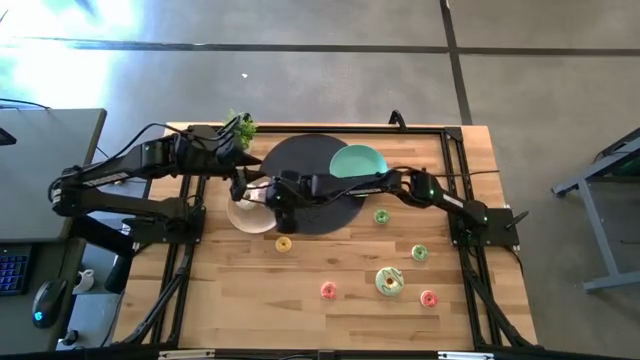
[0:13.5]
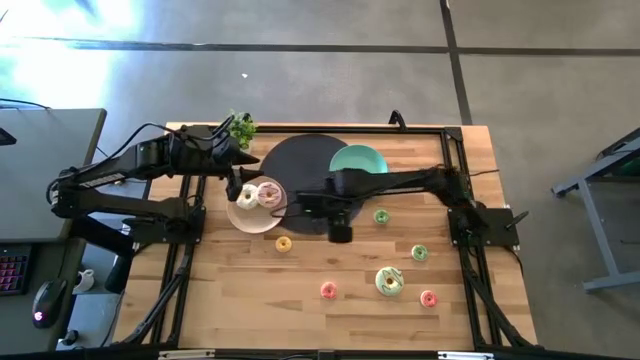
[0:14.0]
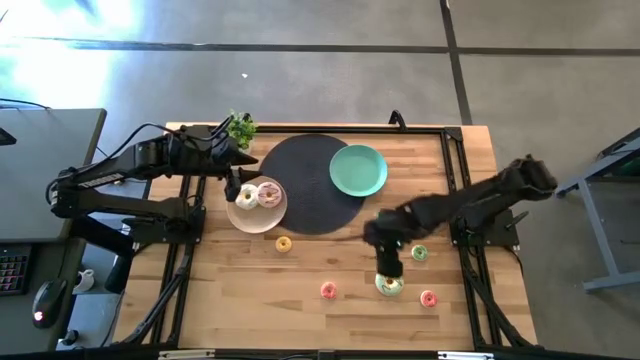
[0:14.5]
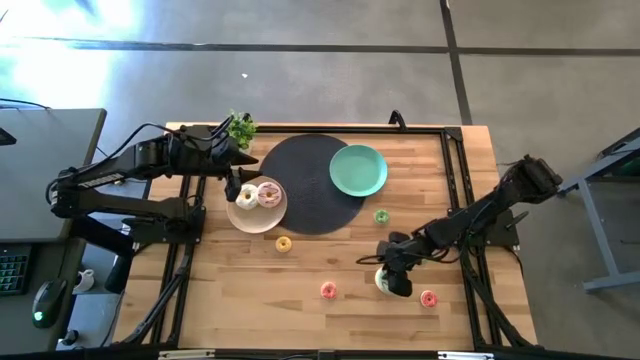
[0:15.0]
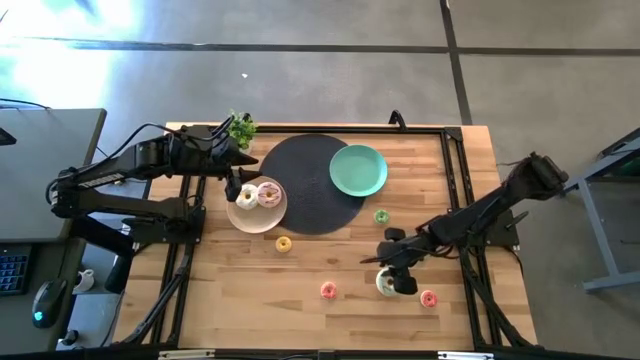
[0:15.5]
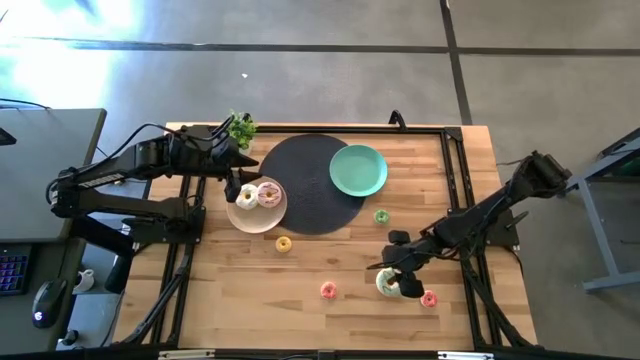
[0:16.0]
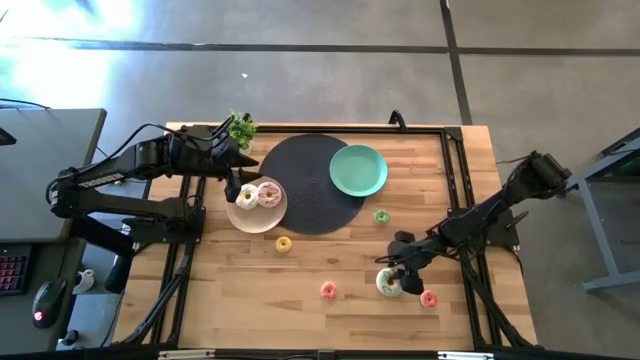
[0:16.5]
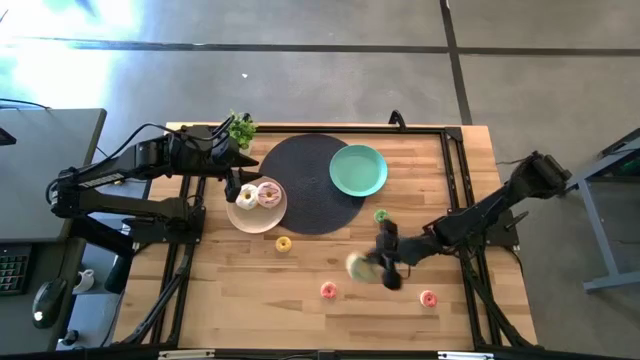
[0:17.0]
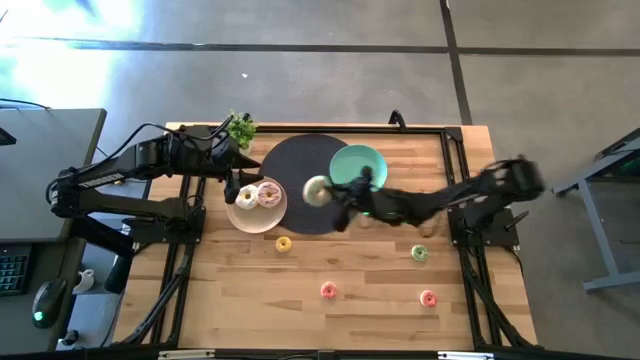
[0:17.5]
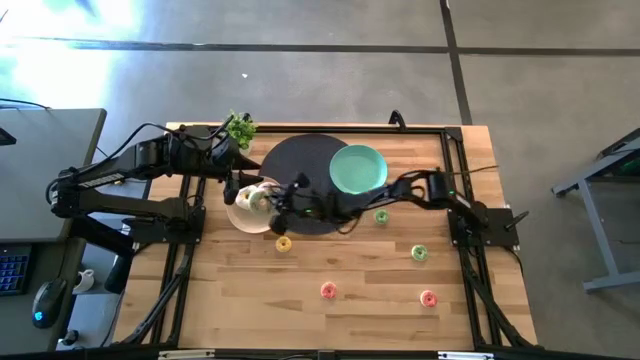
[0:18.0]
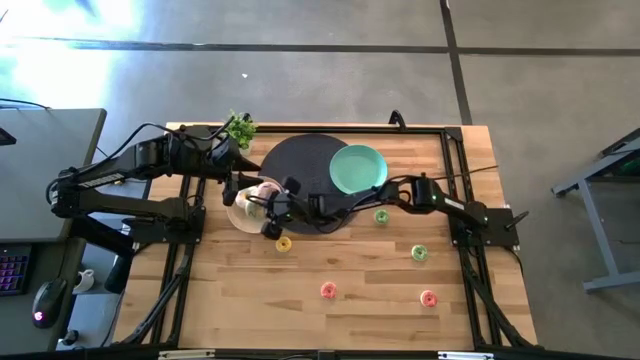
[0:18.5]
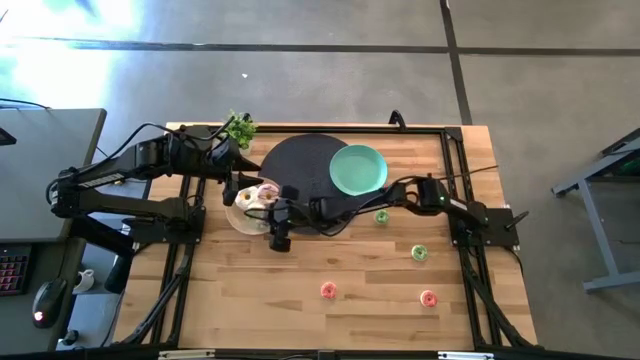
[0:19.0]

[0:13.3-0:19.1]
Task: Pick & Place donuts
Put the large light blue donut on the brown plate

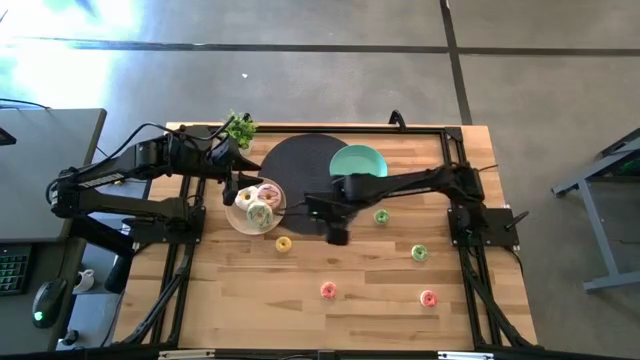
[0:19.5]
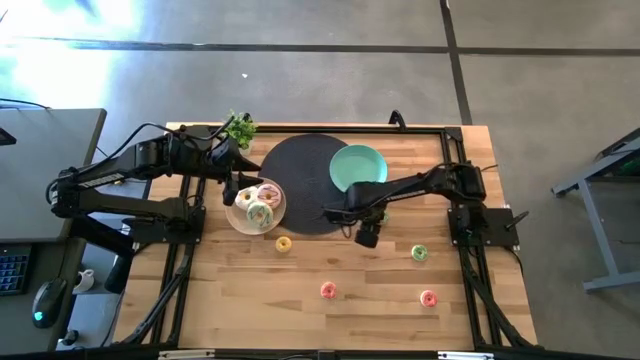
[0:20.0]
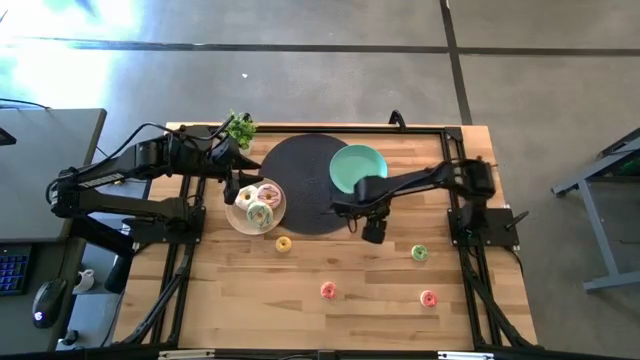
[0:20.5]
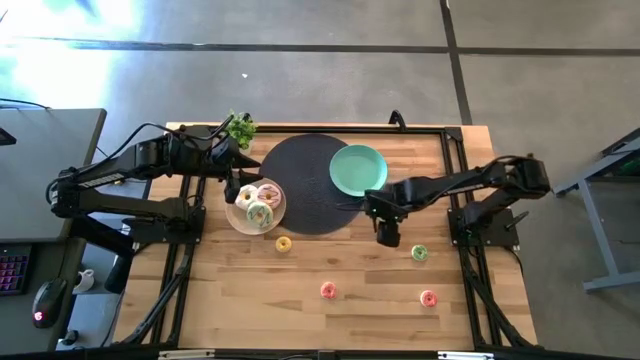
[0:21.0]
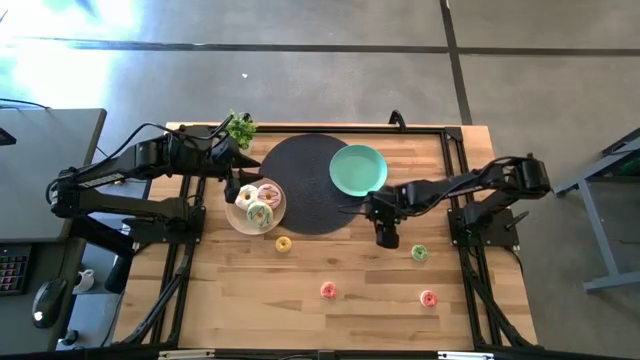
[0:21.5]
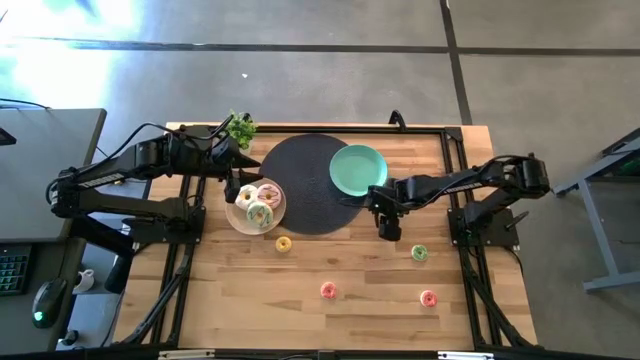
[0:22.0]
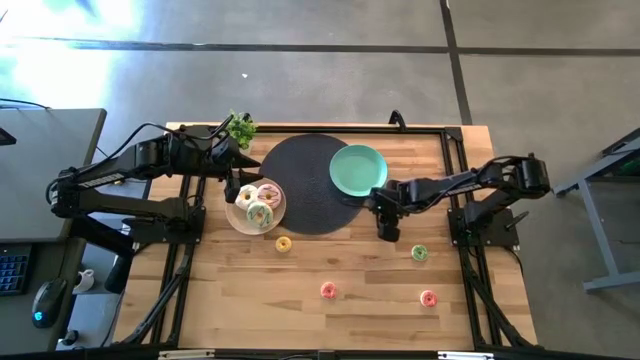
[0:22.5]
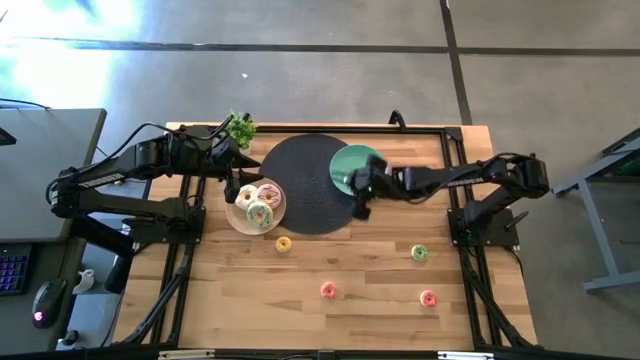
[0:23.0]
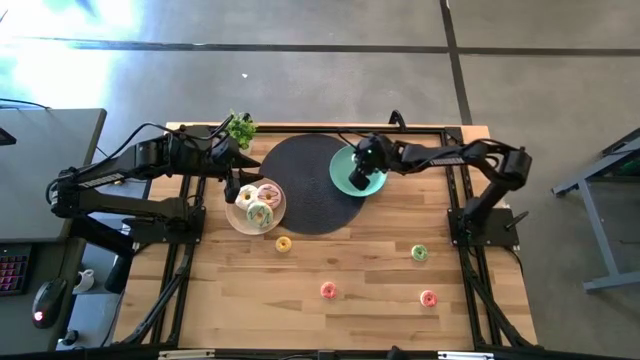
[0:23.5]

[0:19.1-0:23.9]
Put the top small green donut on the green plate

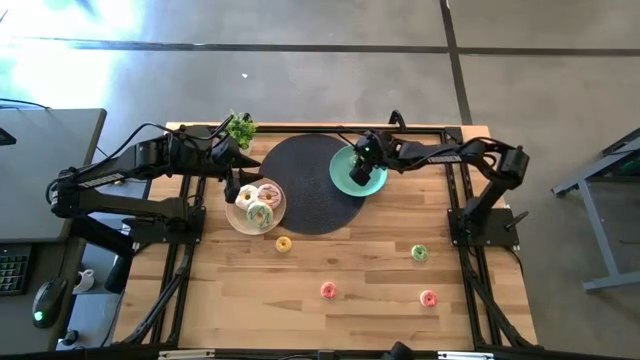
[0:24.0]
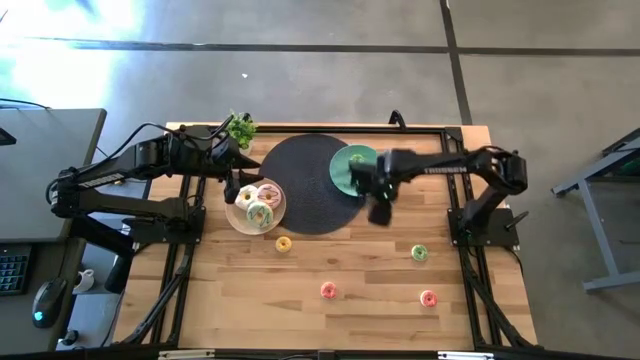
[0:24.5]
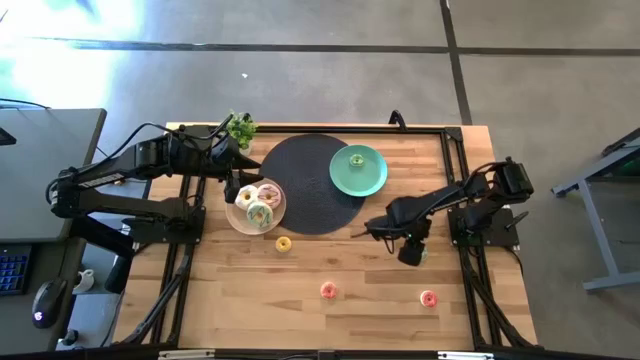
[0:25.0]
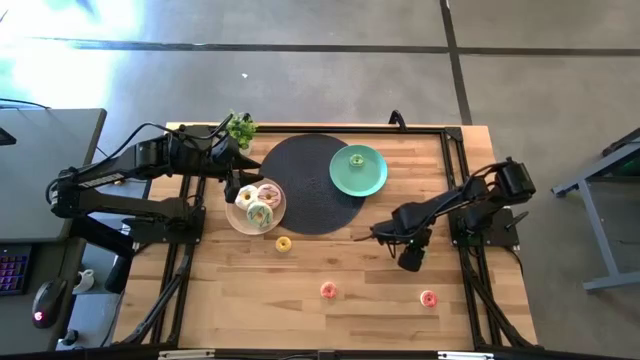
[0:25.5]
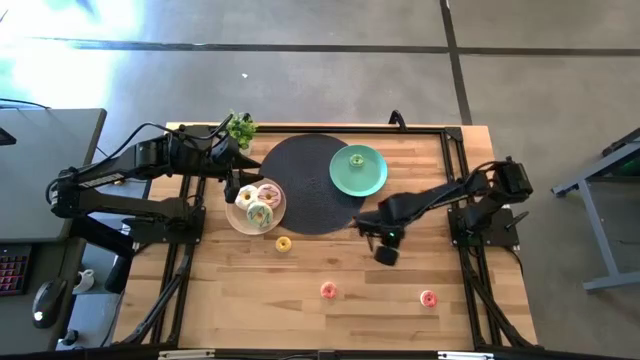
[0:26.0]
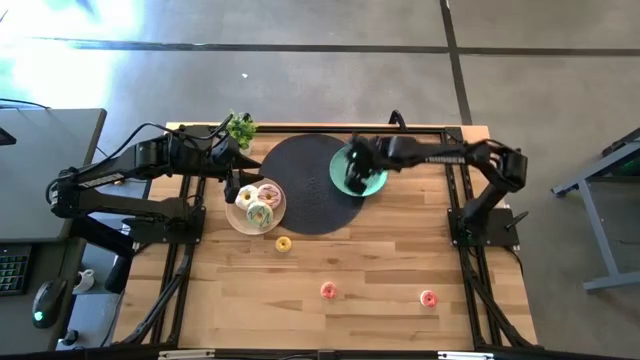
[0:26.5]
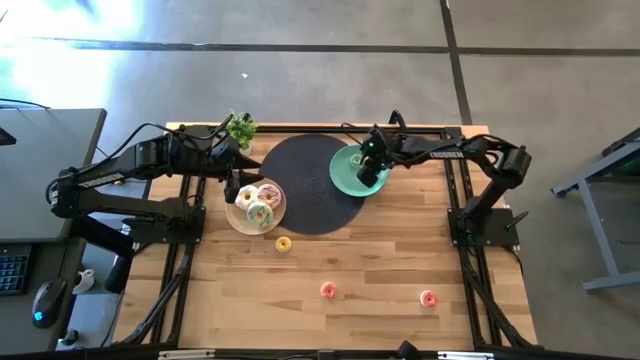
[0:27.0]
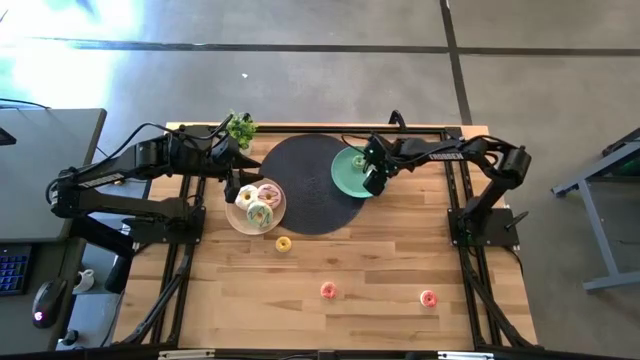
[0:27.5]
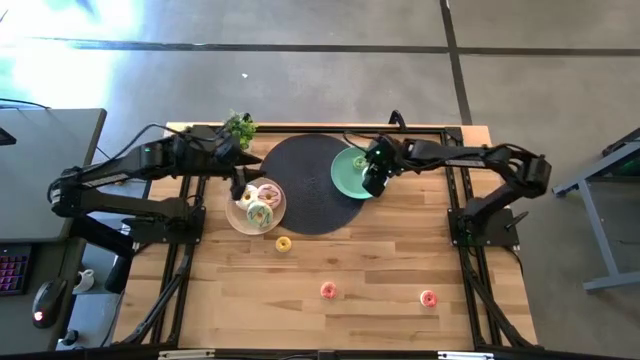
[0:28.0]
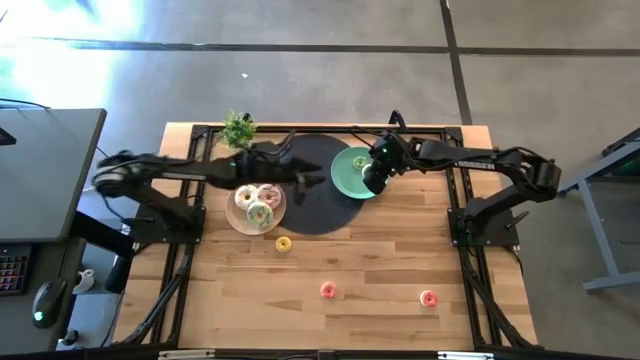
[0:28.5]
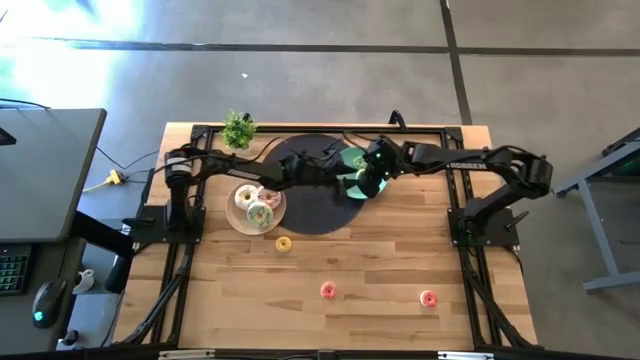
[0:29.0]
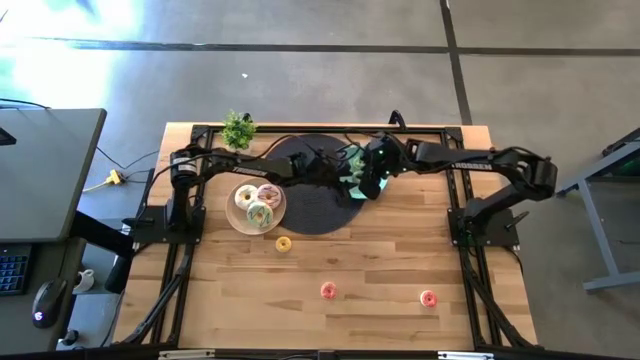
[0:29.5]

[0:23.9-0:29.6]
Put the small green donut on the green plate

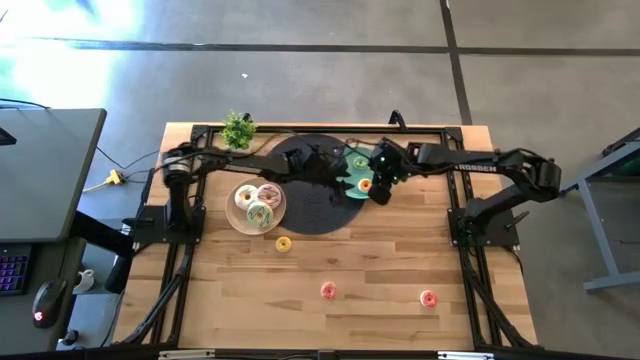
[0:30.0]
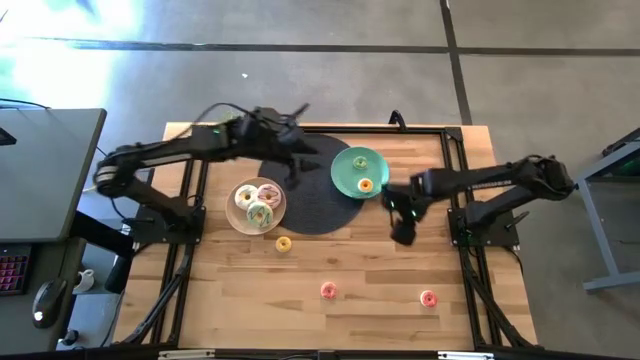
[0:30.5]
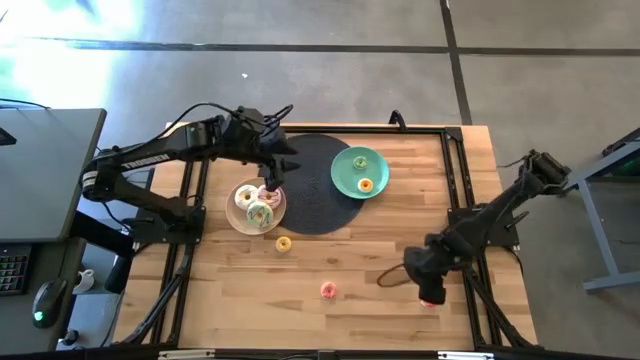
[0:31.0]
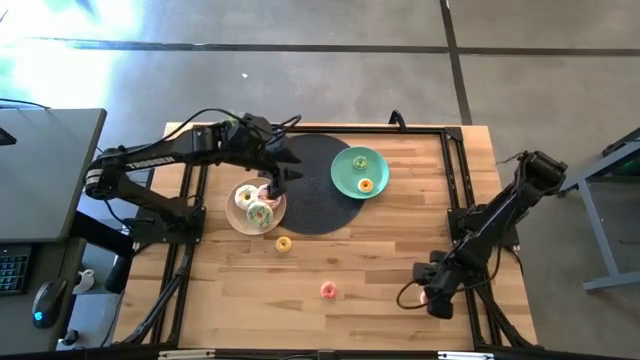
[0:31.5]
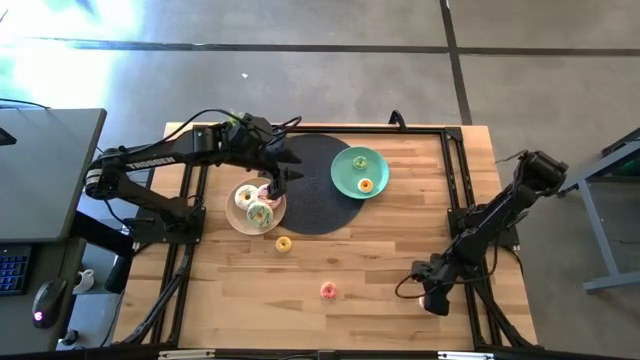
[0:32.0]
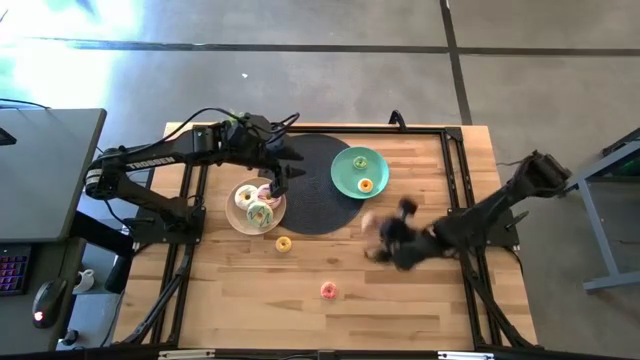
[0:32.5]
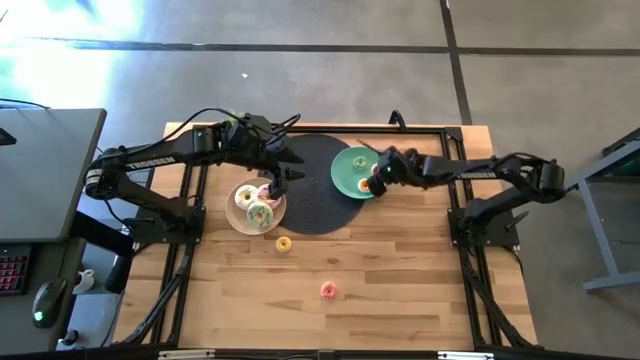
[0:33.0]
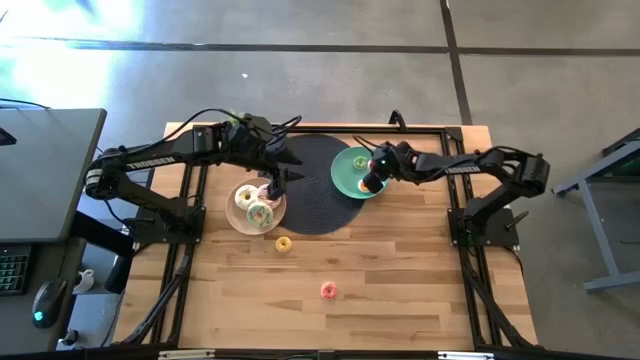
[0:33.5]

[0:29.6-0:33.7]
Put the small right pink donut on the green plate
